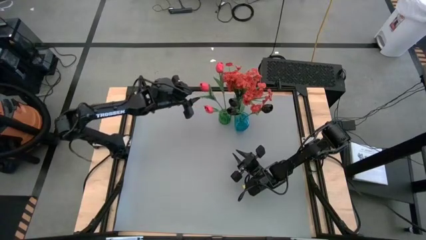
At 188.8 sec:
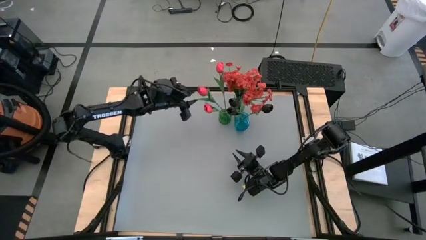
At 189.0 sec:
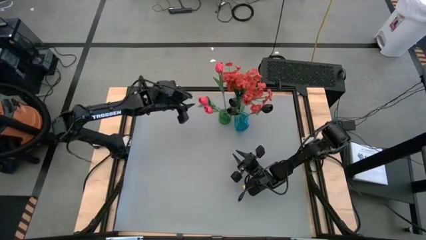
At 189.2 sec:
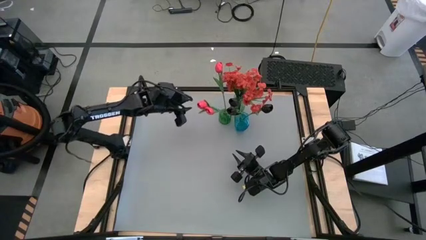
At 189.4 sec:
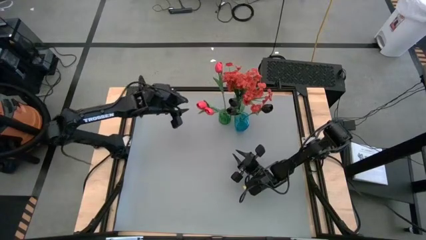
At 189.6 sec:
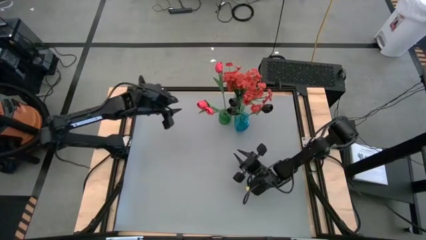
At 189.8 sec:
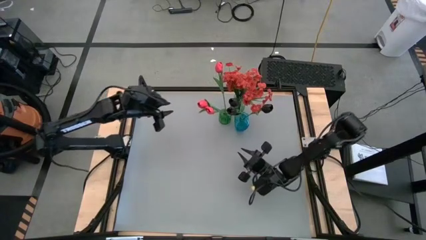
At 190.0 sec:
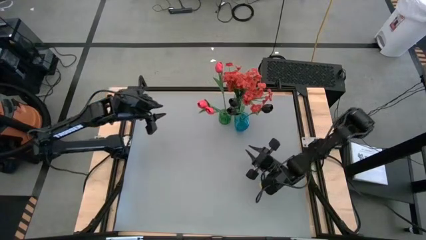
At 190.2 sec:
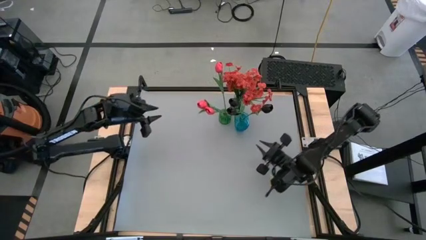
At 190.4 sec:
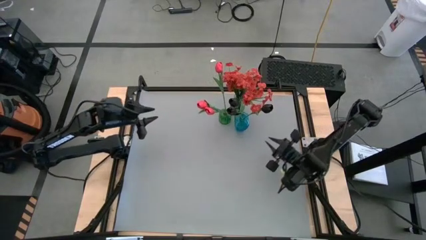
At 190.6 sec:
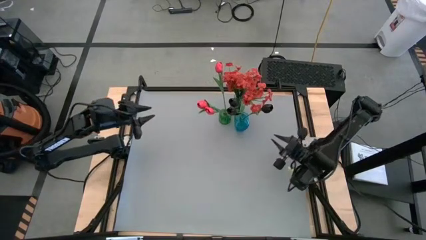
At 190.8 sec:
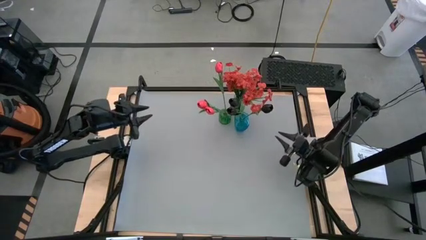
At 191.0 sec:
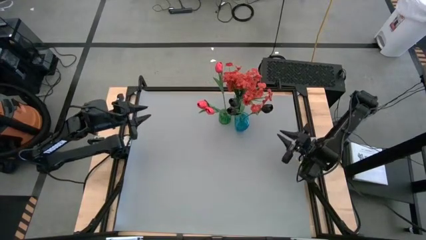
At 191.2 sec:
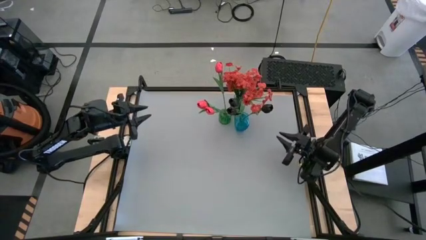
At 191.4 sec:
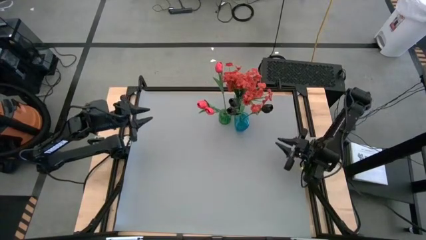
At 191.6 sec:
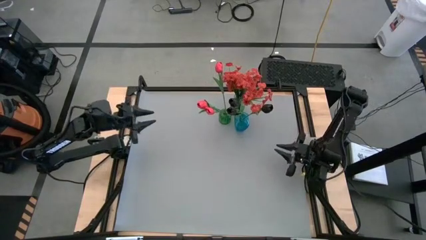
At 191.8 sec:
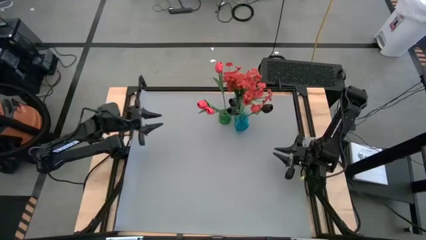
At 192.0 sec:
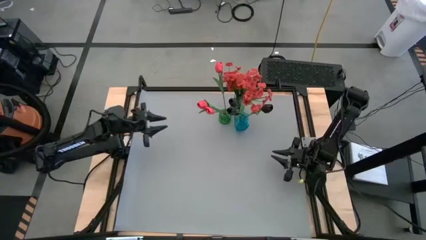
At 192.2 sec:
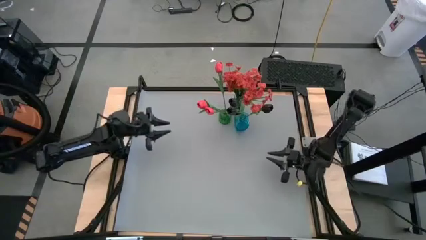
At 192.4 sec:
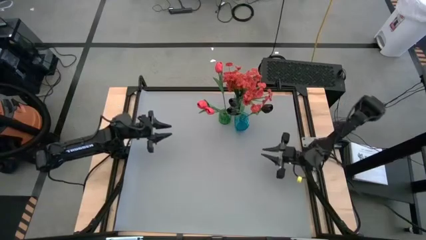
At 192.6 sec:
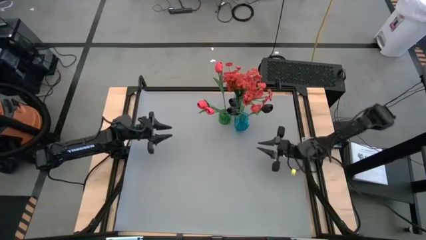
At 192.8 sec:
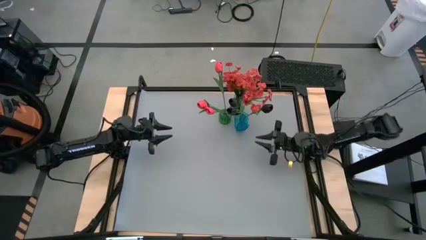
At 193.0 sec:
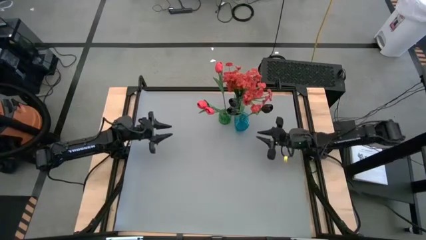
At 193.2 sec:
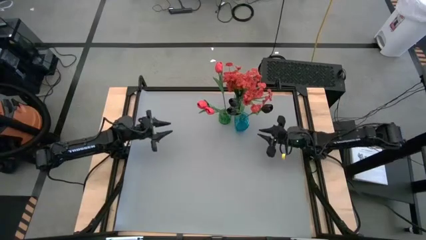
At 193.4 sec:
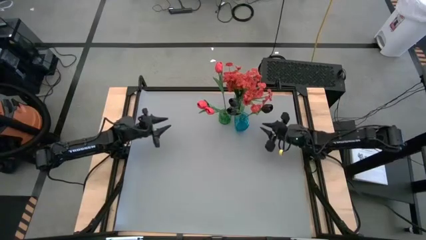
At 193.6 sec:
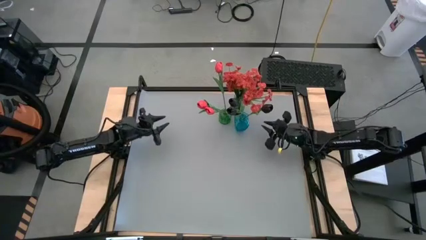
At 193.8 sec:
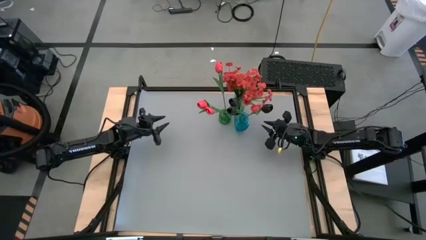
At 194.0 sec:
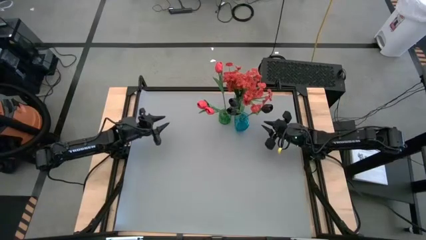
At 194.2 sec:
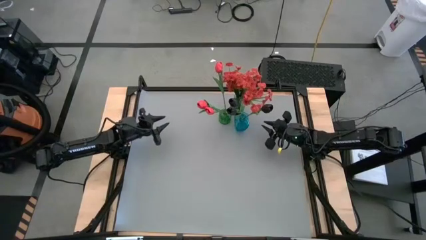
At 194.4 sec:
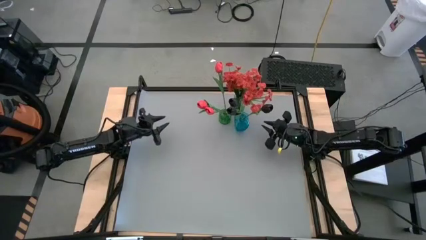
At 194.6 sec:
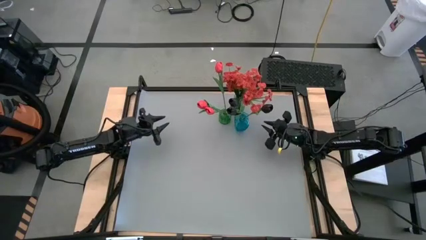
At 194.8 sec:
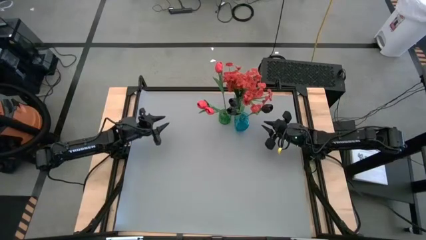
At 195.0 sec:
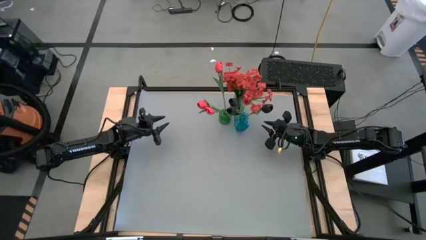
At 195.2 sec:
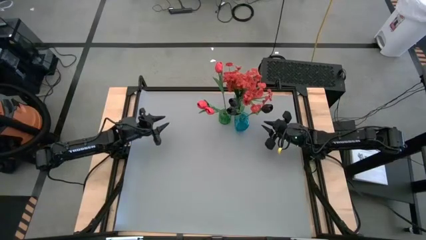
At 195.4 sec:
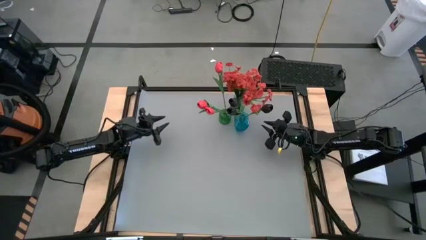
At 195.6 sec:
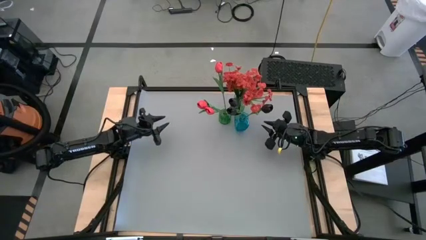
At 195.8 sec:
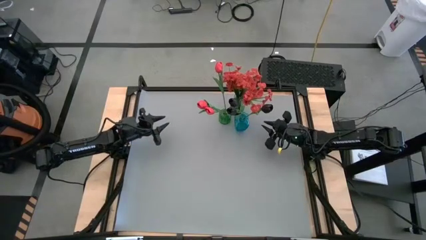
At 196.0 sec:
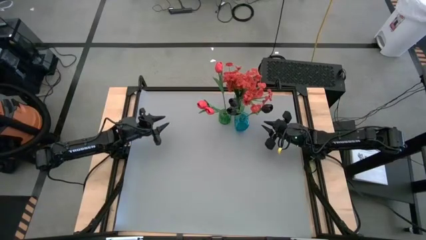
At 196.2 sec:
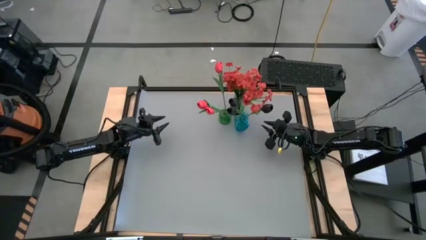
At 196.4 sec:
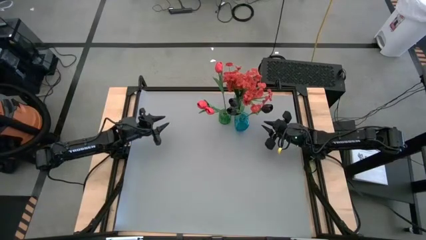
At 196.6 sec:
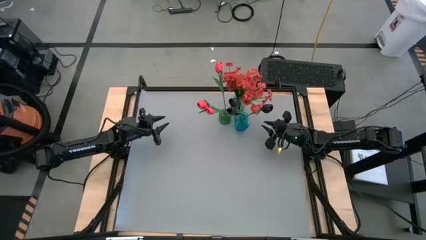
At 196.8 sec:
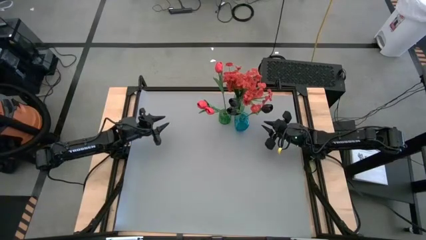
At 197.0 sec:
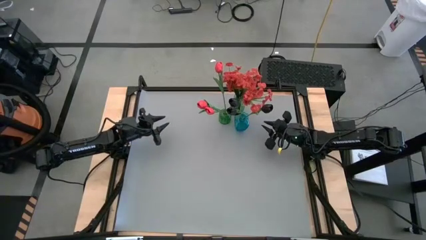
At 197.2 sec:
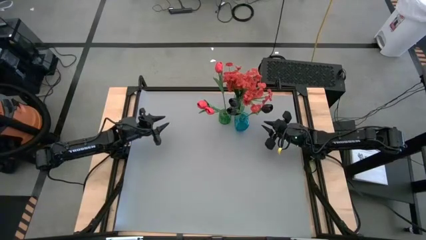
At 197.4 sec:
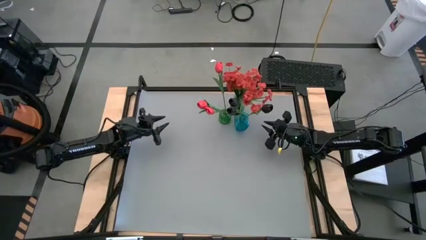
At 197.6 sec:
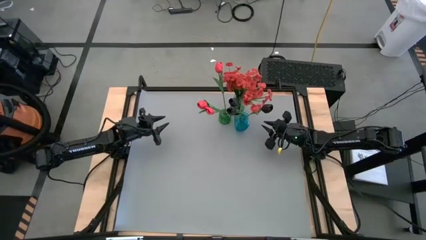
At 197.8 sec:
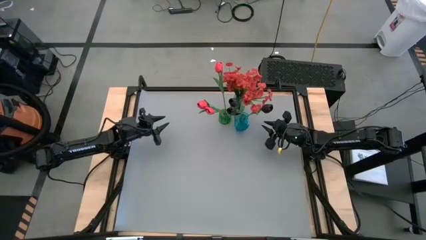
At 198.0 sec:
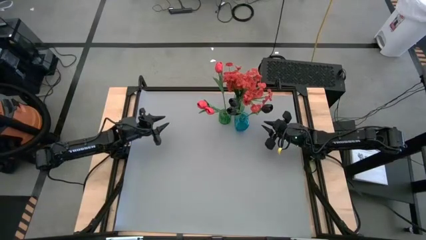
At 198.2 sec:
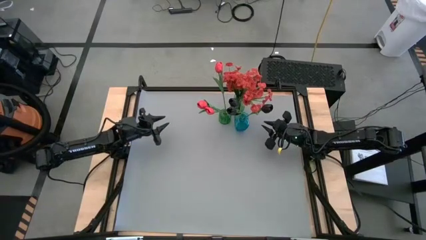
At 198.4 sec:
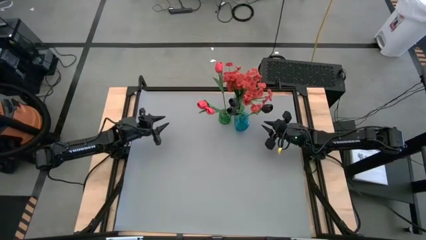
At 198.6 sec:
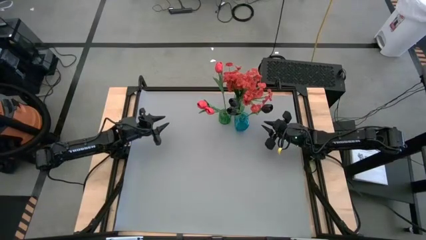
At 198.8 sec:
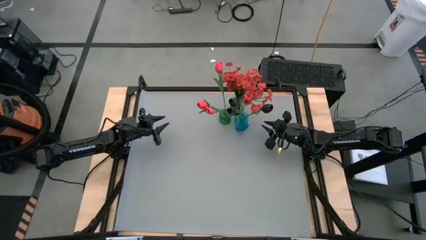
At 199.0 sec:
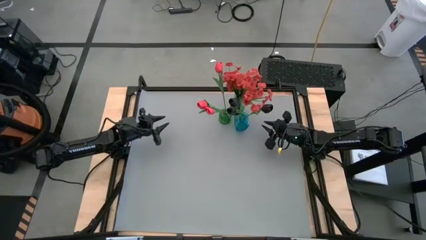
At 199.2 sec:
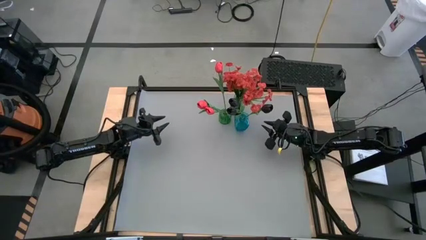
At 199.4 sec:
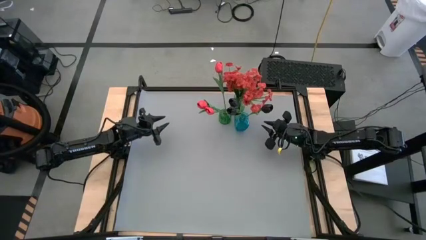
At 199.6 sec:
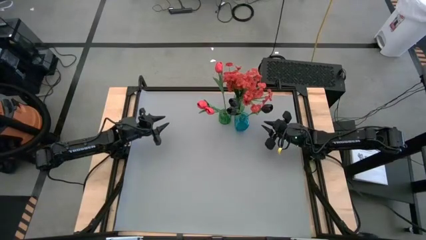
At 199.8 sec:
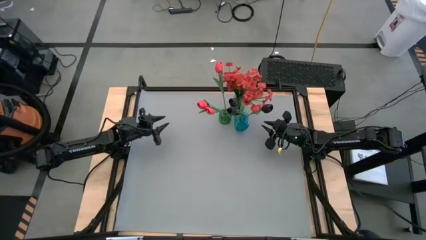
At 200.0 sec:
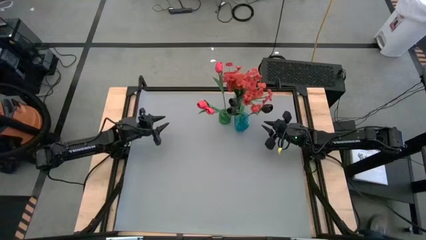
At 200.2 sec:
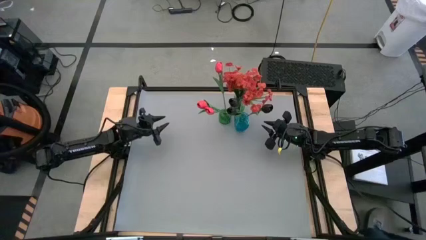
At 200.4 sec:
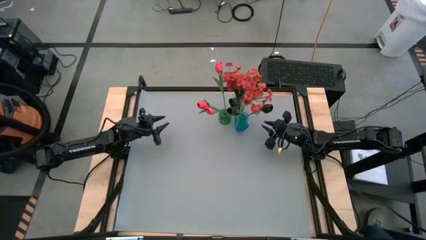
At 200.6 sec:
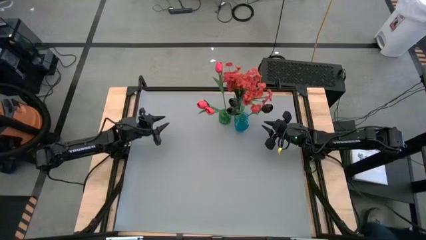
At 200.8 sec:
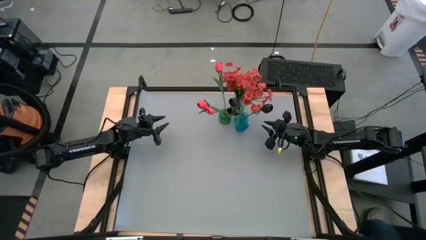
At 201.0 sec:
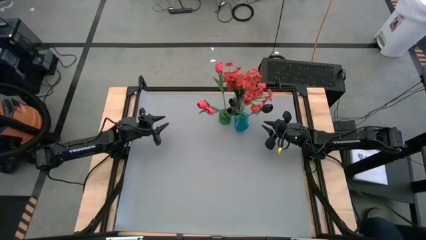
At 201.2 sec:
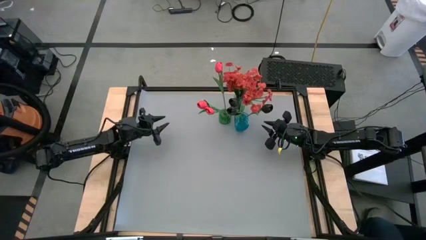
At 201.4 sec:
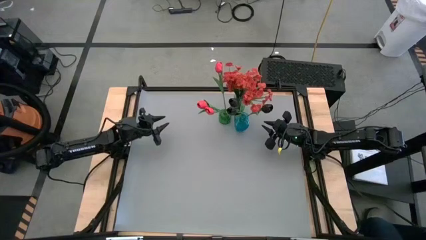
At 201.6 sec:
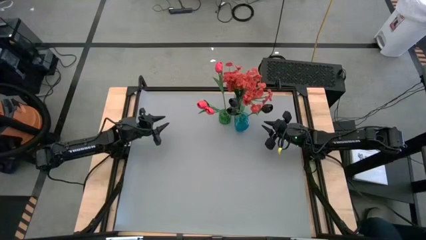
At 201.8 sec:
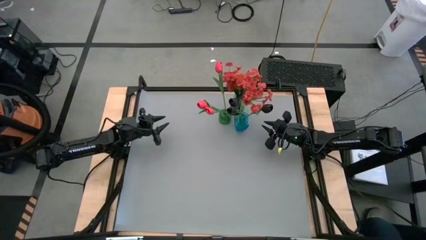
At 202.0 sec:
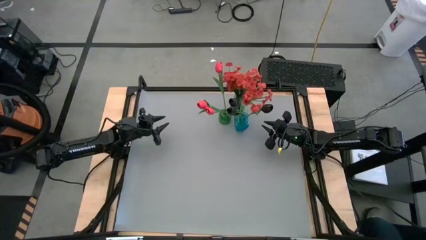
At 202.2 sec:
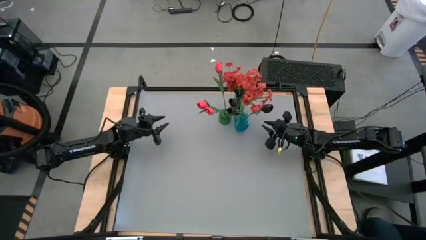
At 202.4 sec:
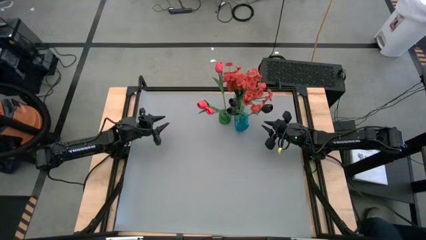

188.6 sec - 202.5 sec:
Task: Sort flowers into vase by color
Return to Home Position

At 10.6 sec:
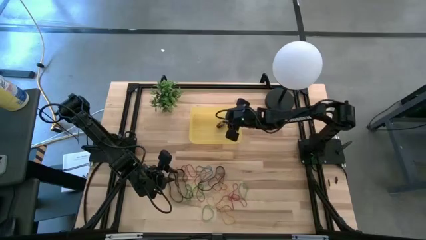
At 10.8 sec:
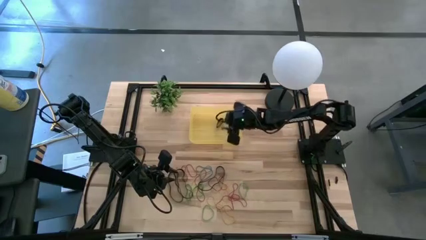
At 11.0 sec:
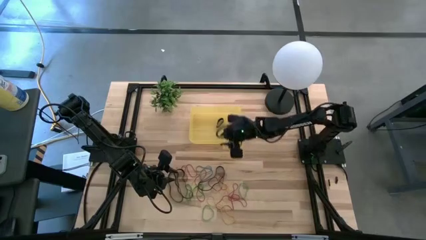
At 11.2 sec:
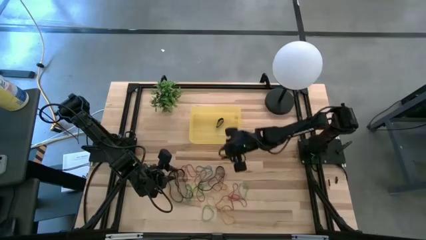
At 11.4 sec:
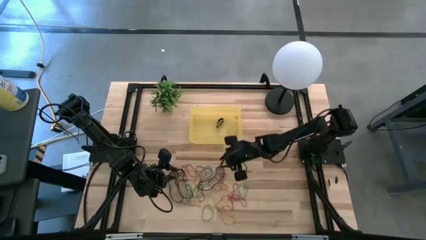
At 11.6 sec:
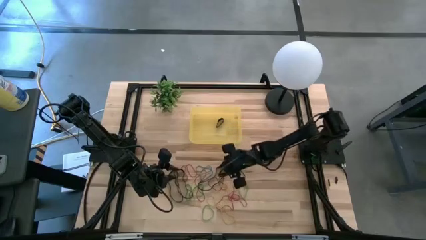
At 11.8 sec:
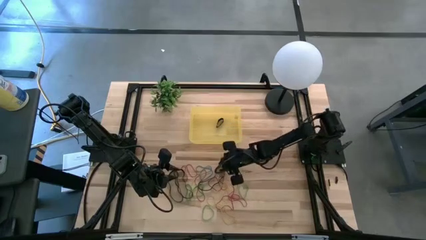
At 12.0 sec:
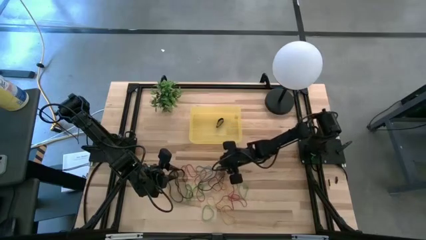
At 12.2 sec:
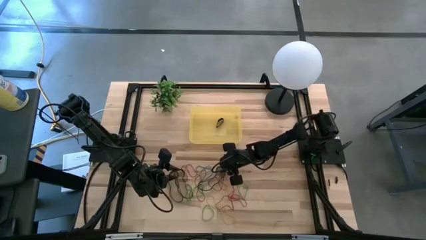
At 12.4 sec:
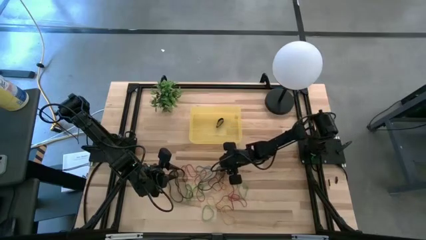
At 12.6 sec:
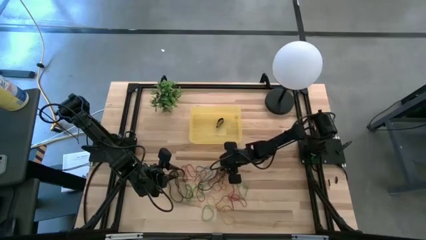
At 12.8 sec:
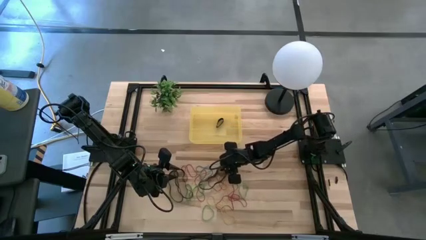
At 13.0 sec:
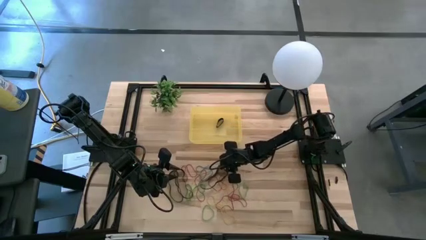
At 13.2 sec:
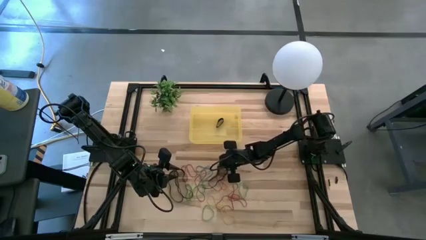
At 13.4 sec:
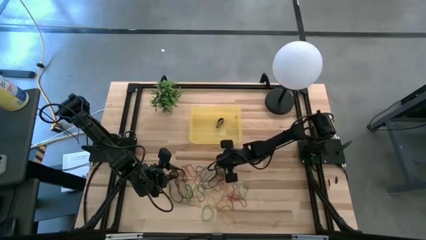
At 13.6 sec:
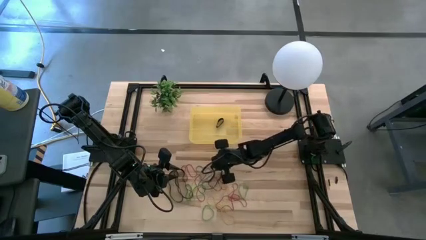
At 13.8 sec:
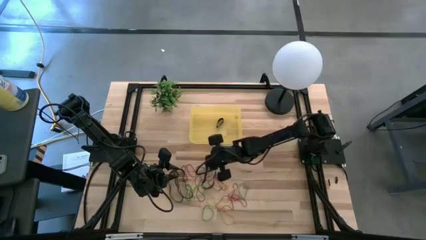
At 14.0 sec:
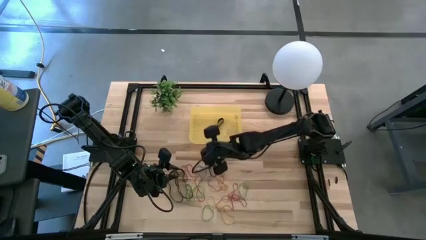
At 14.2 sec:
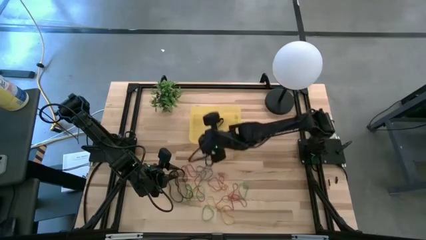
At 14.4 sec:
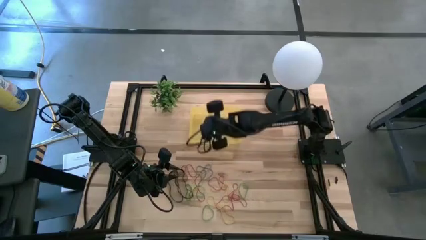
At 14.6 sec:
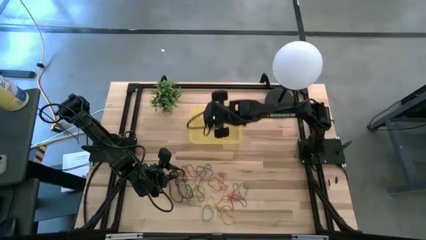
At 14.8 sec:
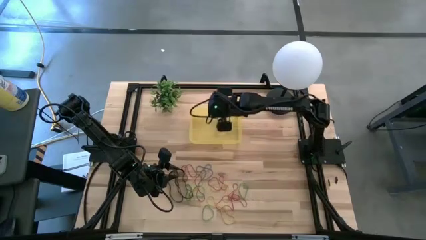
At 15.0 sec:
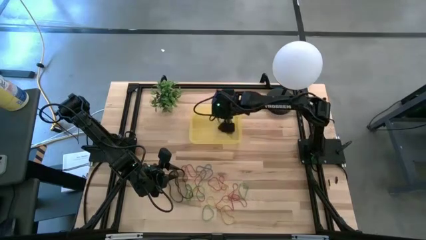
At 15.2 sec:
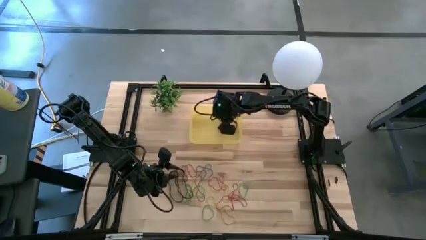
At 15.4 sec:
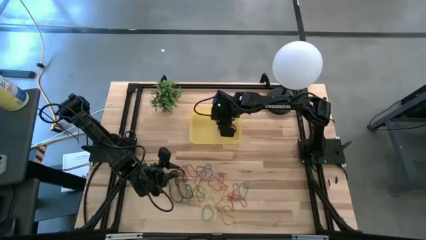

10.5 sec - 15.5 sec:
Task: Pick and place rubber bands into bin
Put the black rubber band into the yellow bin
